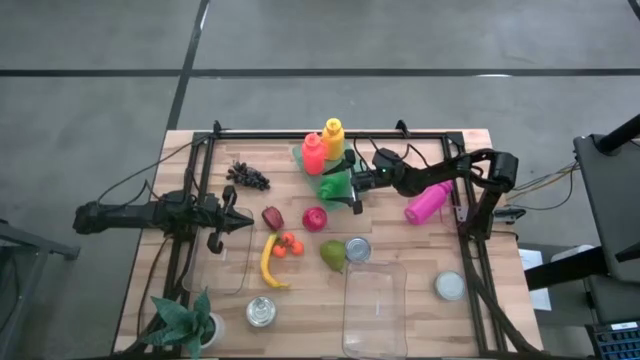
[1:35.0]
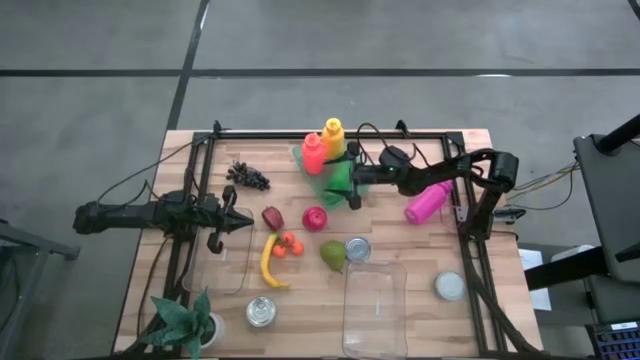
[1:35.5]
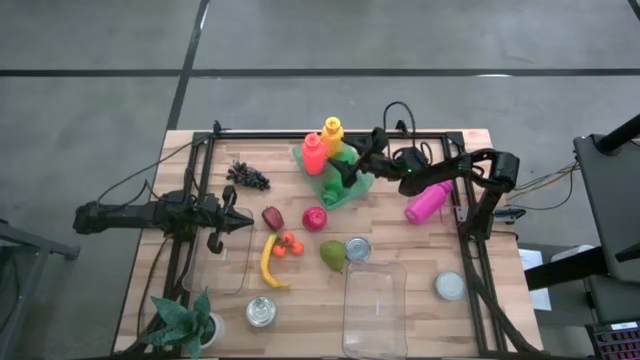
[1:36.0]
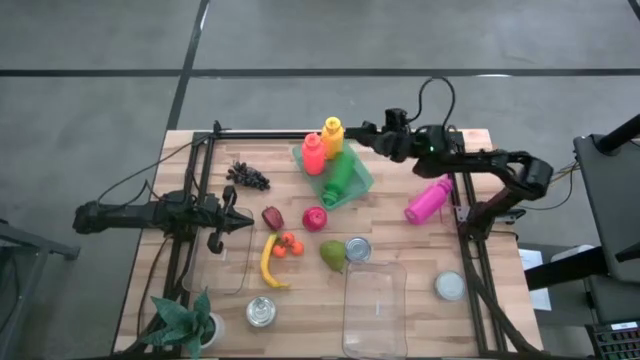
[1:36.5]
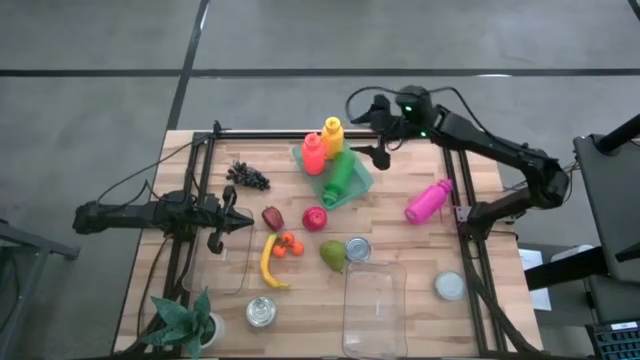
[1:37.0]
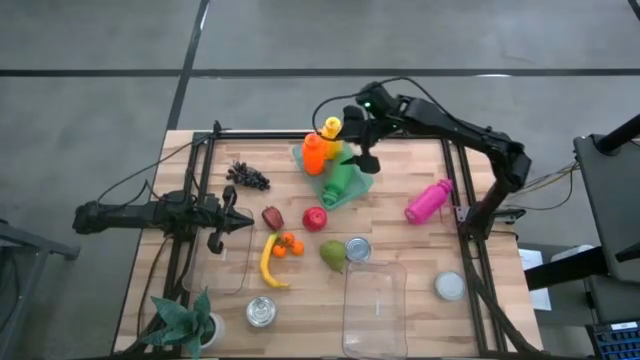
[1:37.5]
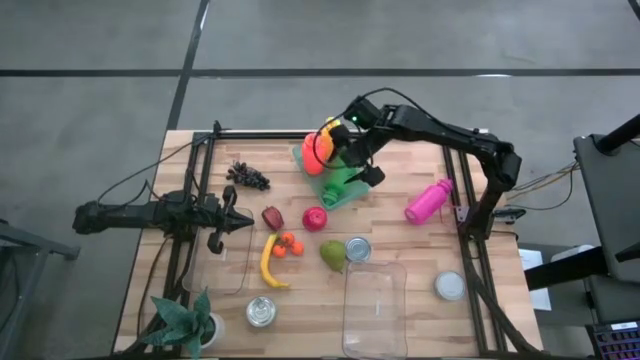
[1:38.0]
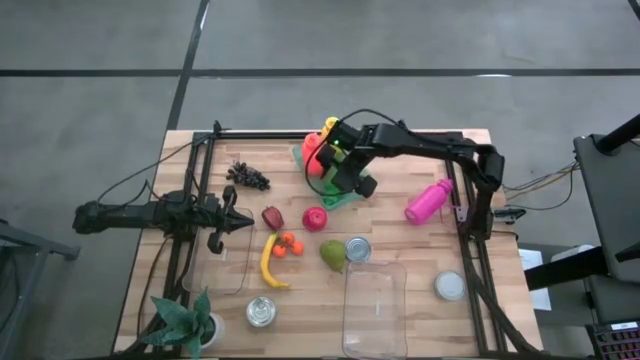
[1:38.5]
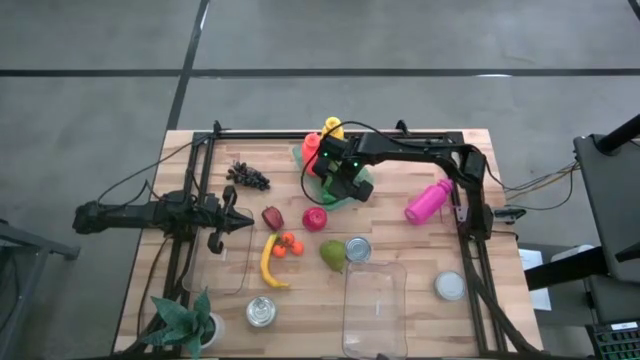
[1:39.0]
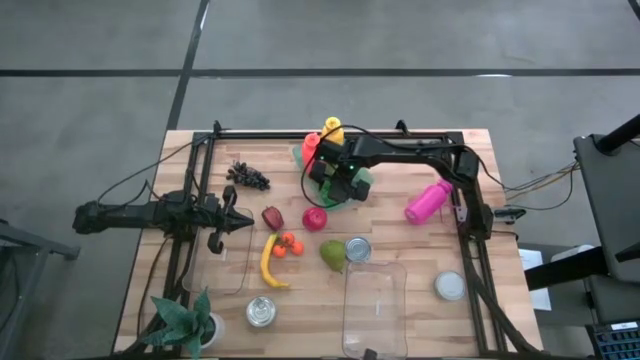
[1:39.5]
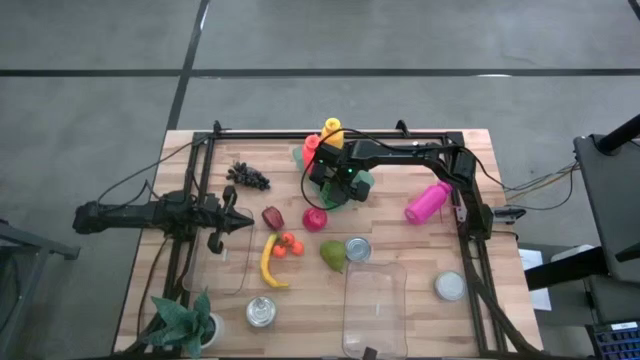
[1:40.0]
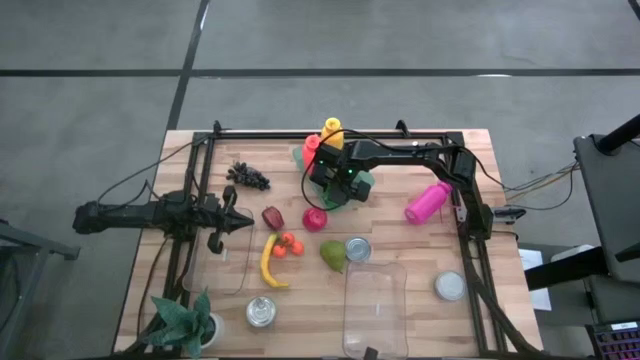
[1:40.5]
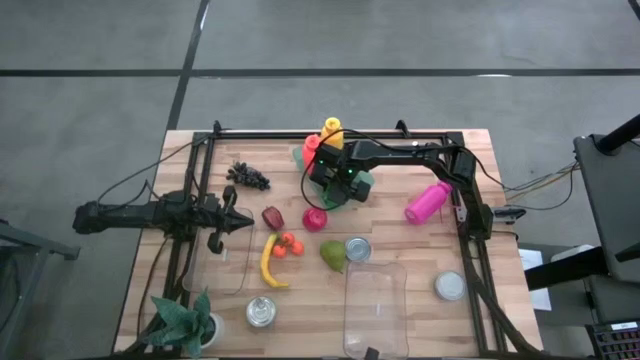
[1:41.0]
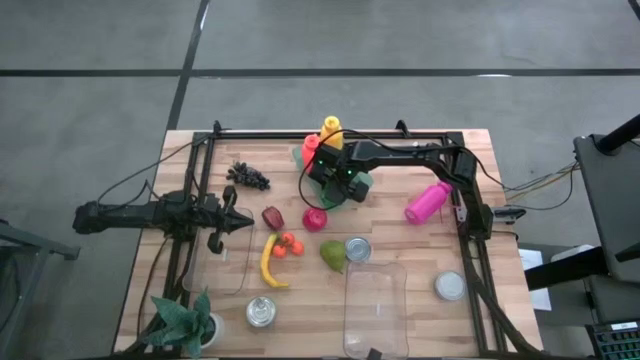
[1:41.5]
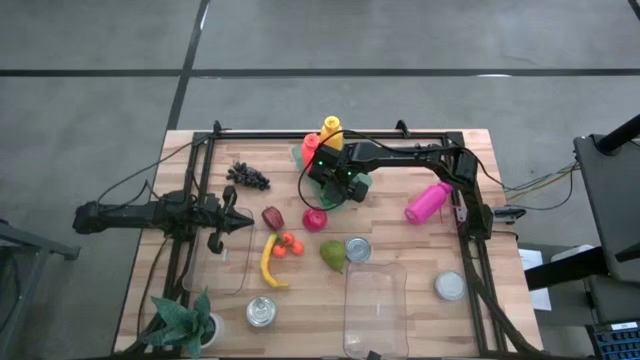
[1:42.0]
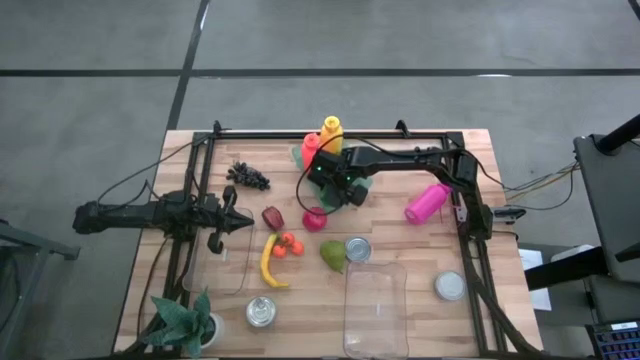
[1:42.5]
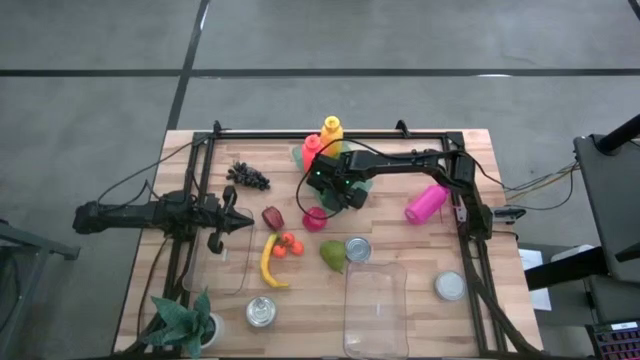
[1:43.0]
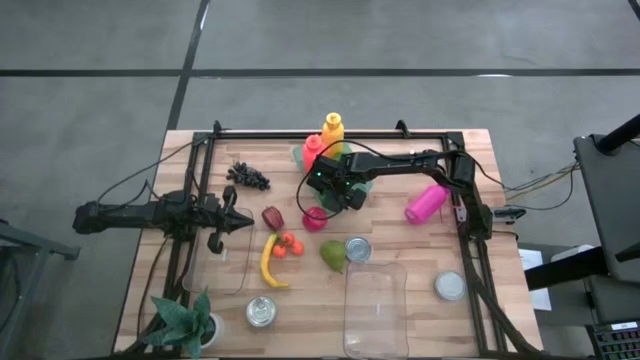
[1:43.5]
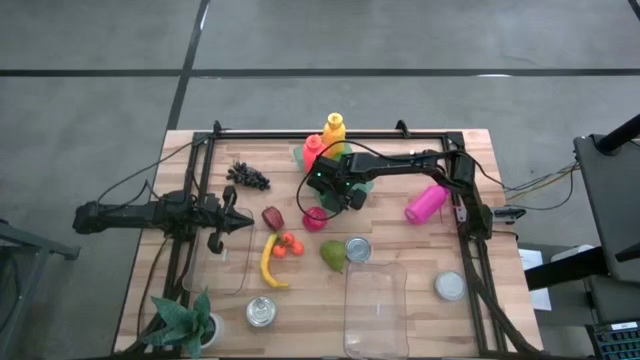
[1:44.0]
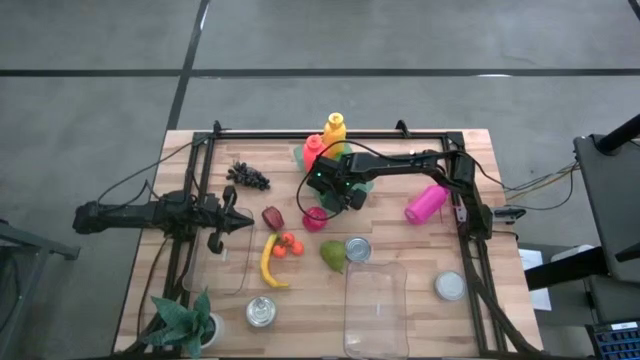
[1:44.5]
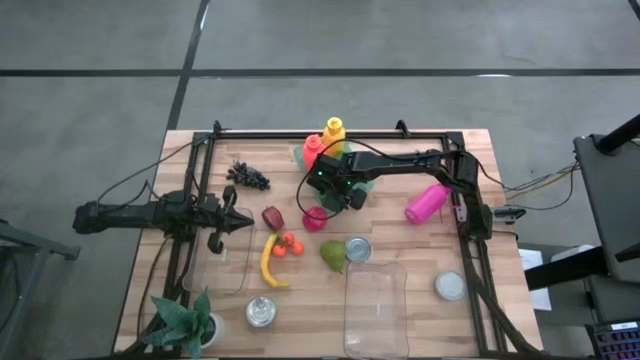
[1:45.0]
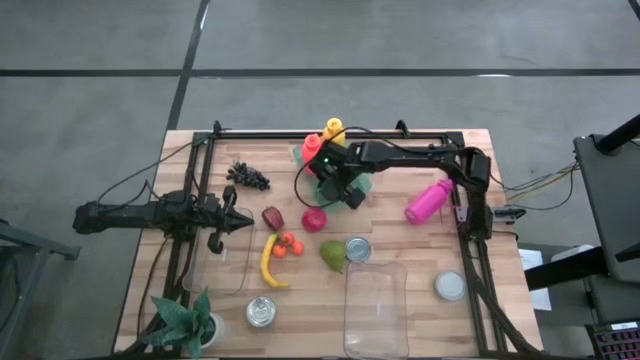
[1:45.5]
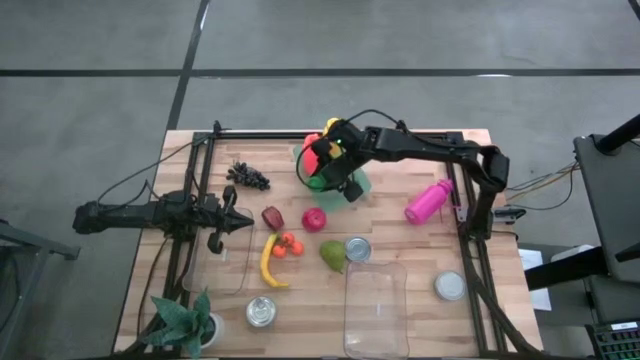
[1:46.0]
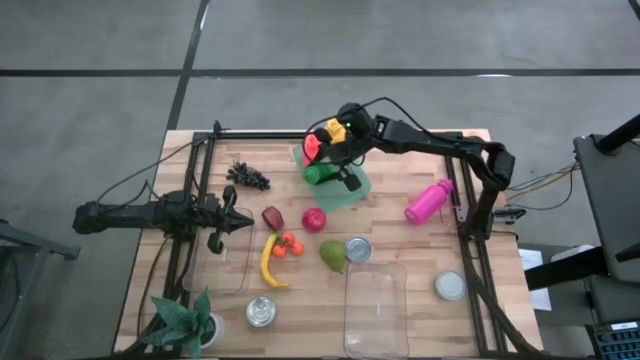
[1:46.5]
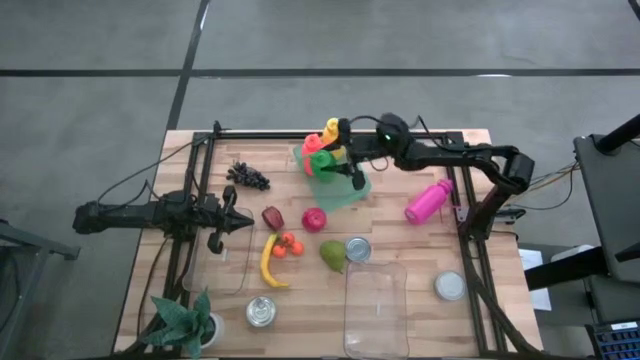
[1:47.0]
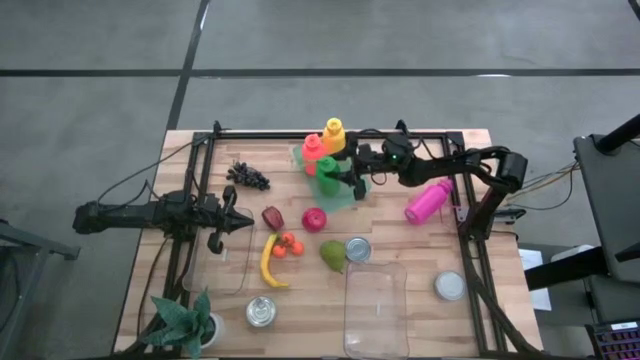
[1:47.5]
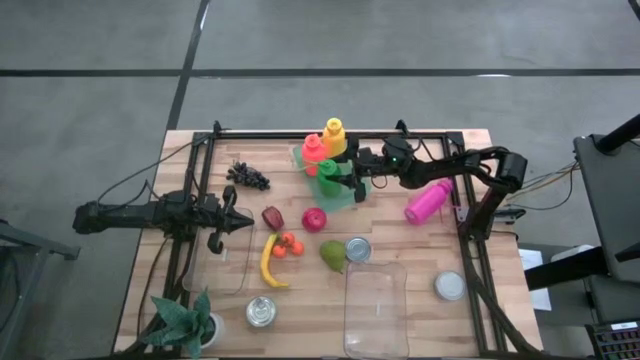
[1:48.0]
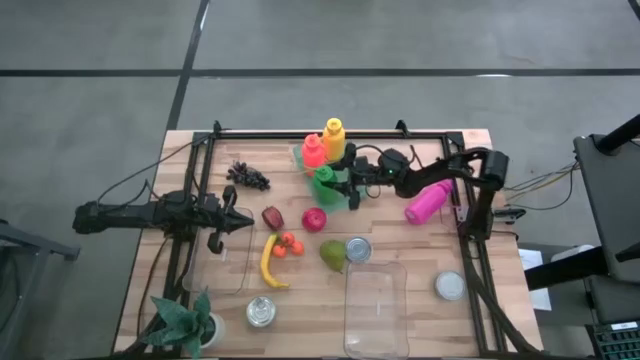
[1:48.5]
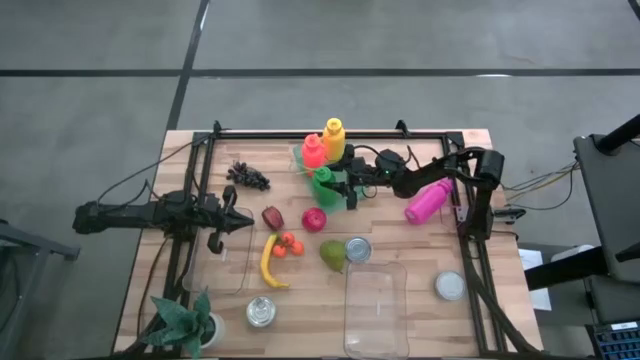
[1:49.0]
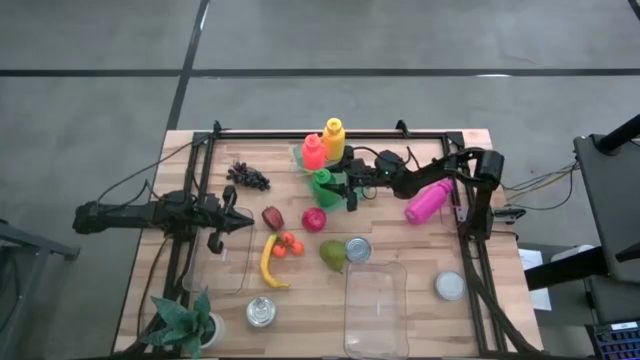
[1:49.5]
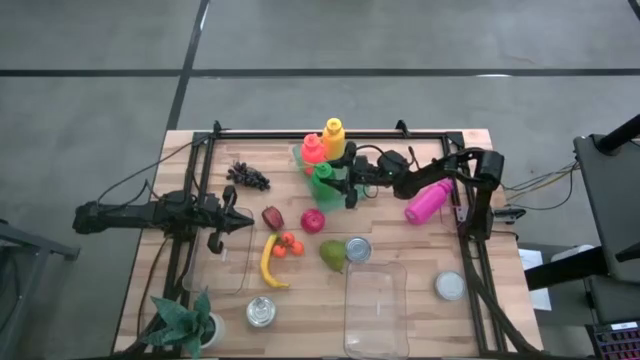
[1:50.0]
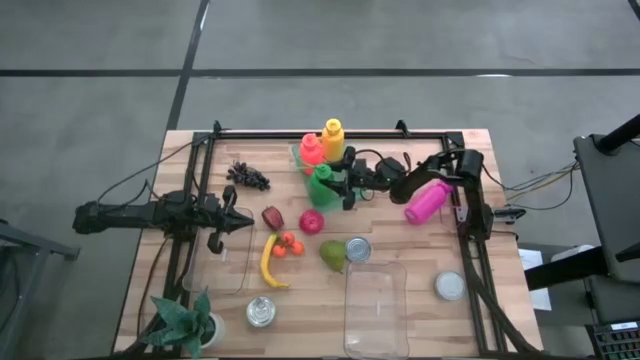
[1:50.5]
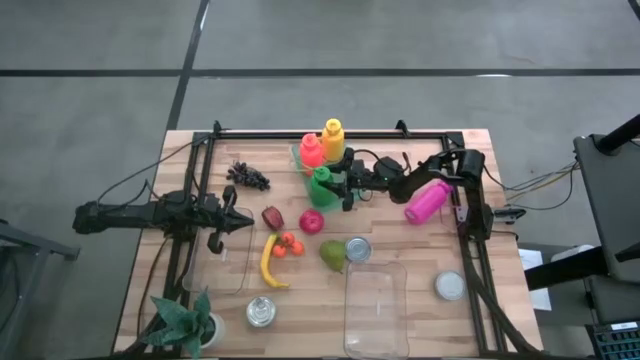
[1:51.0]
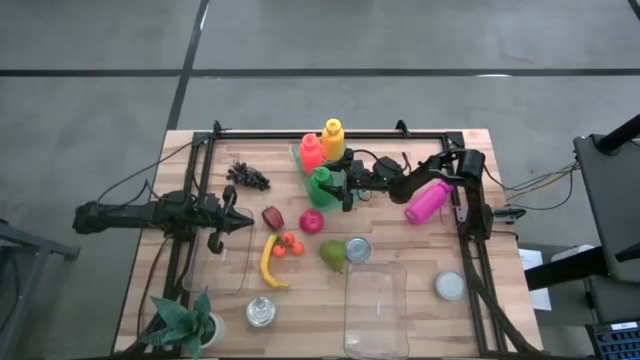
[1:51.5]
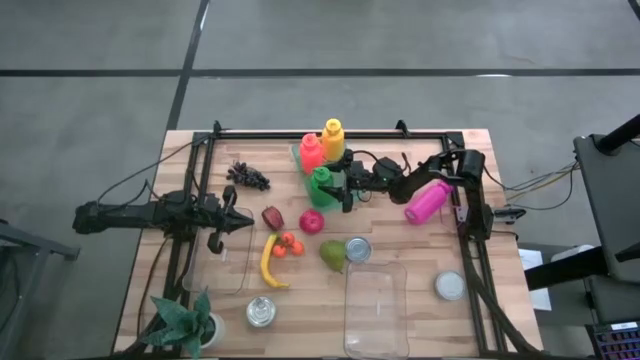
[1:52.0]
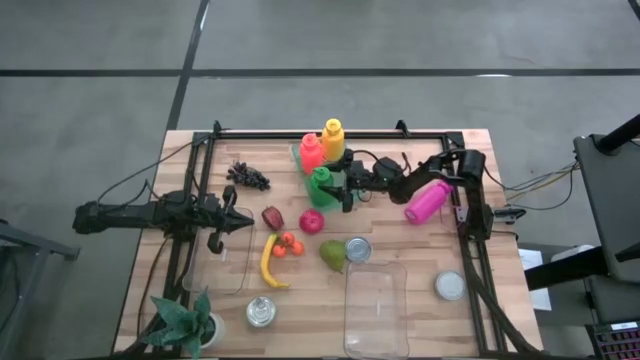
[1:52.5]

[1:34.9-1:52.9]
Task: Pick & Place Food Item
Put the green water bottle into the green bin

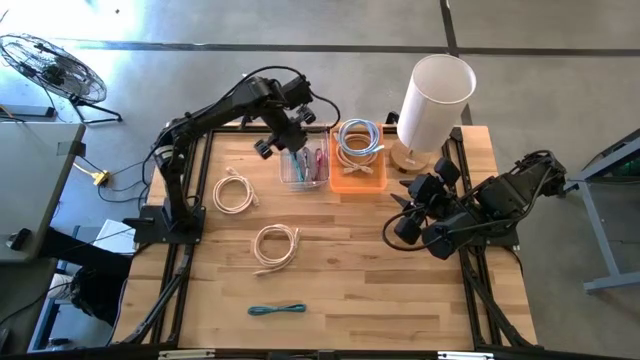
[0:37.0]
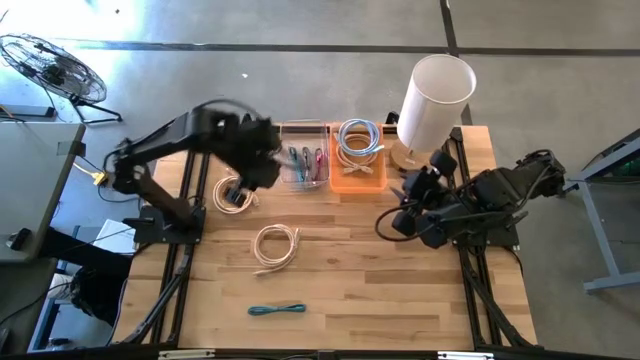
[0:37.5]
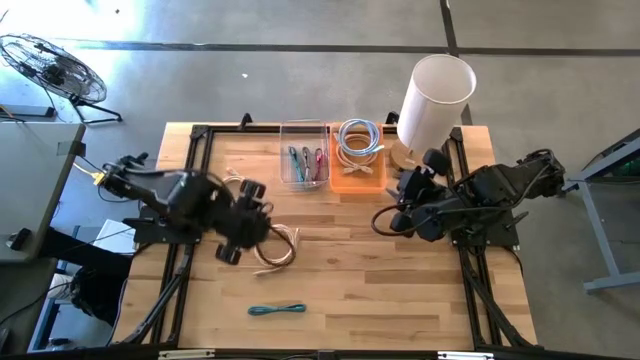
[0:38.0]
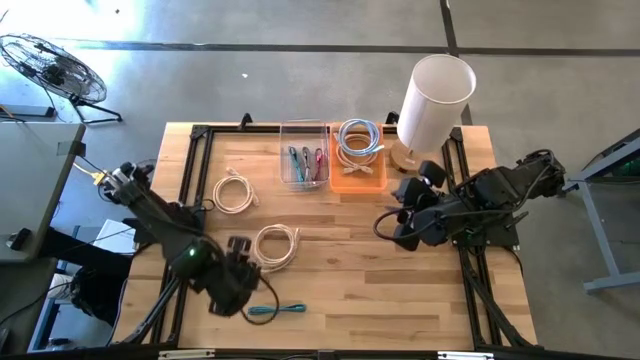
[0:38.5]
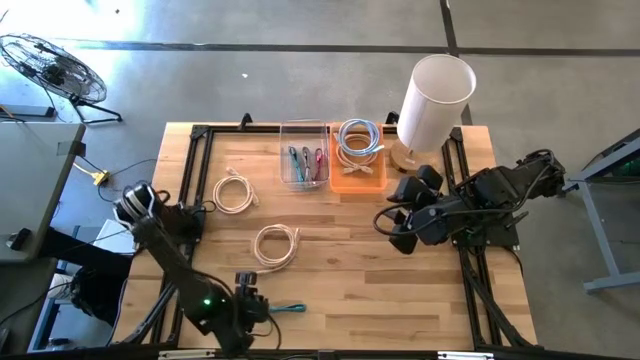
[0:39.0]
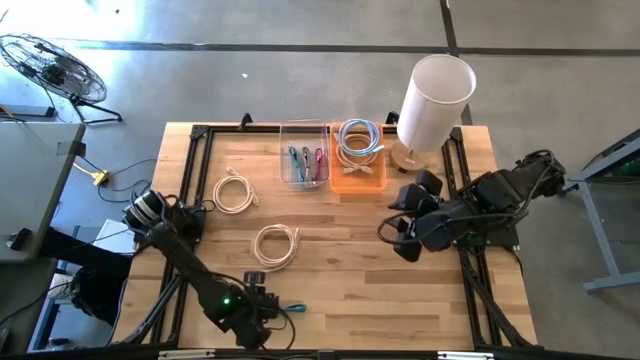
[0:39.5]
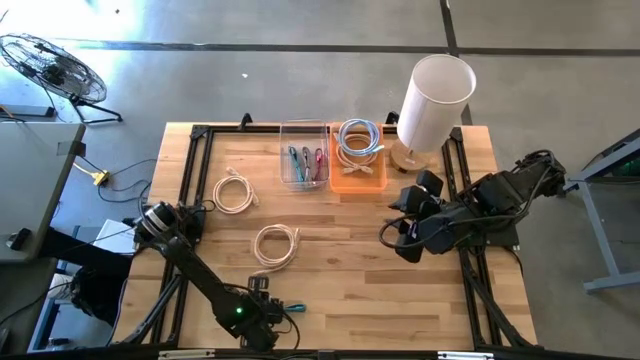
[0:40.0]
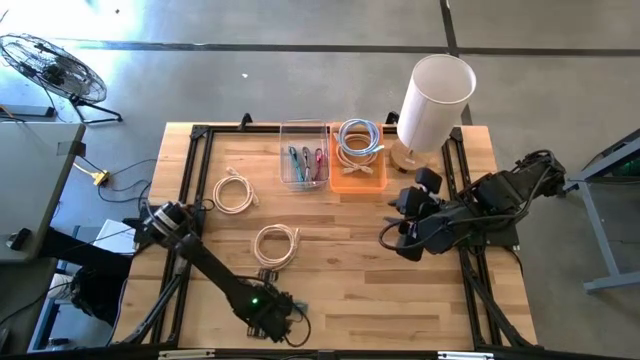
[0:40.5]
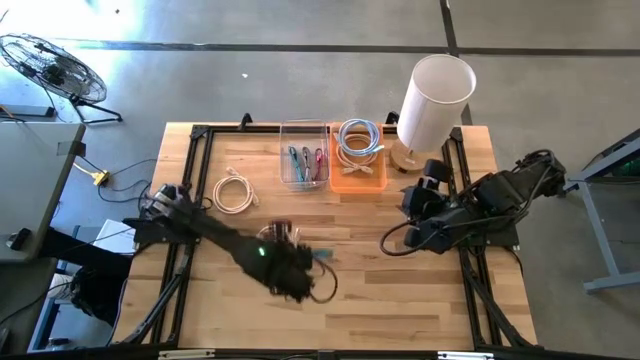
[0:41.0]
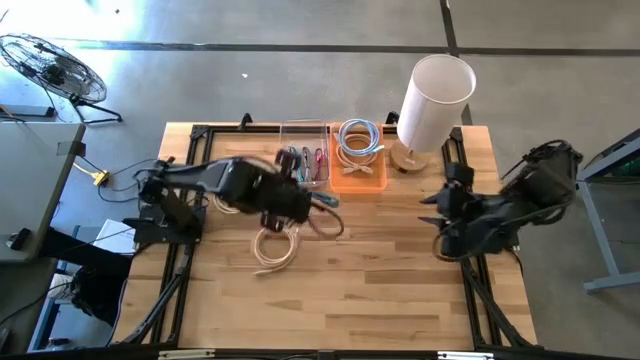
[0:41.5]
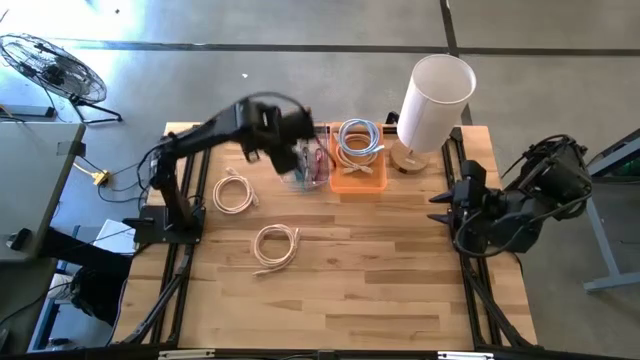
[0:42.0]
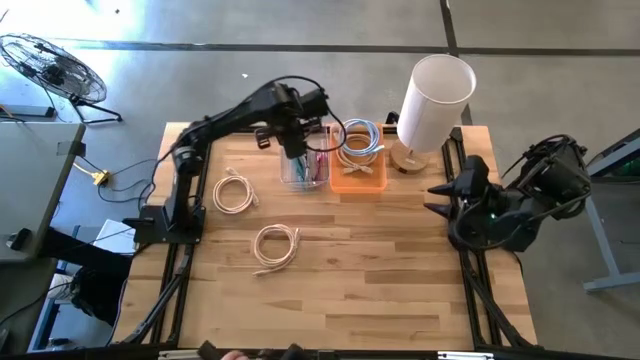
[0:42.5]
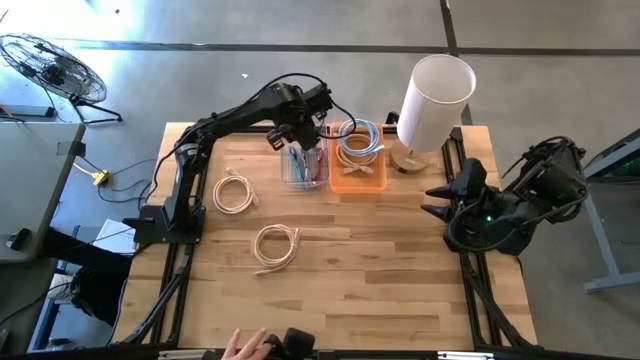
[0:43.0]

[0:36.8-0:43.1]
Task: Pick & Place USB Port
Put the blue charger cable into the transparent bin
